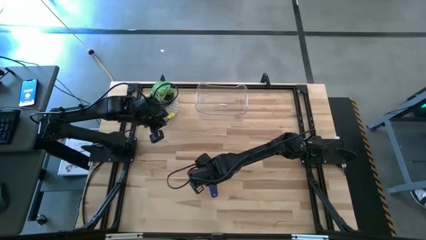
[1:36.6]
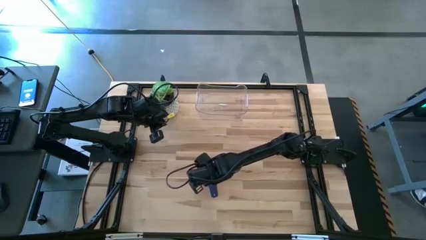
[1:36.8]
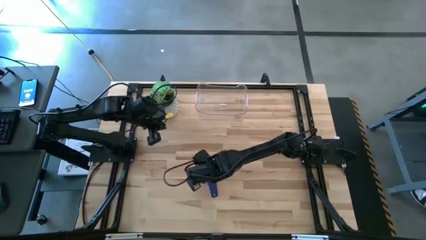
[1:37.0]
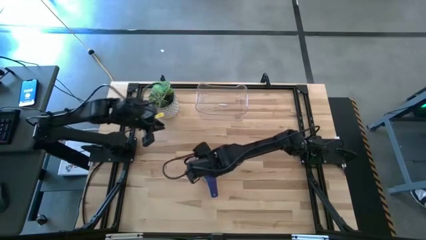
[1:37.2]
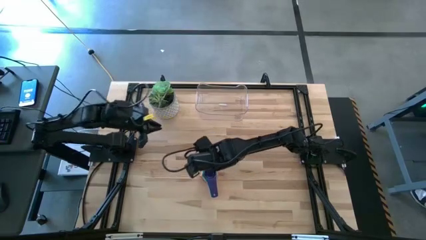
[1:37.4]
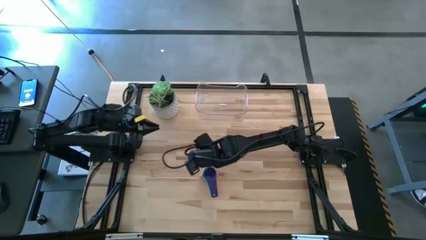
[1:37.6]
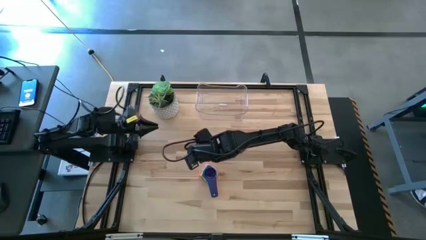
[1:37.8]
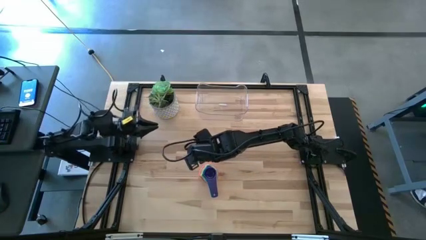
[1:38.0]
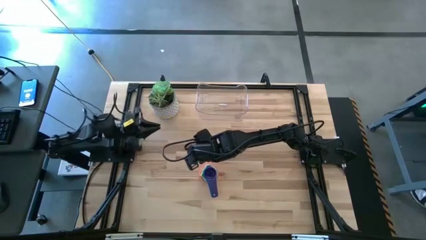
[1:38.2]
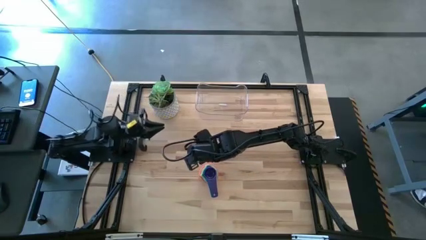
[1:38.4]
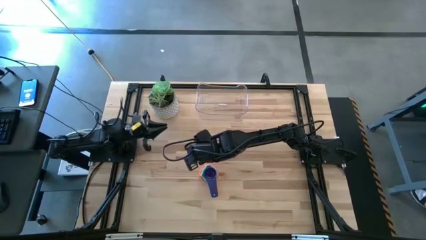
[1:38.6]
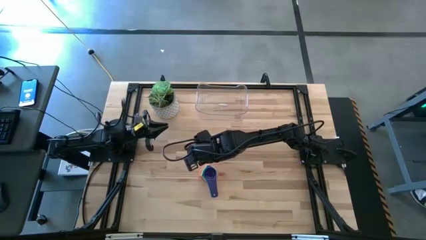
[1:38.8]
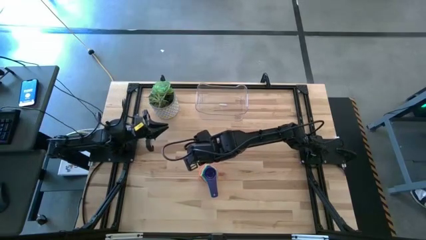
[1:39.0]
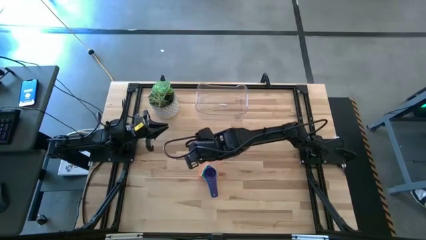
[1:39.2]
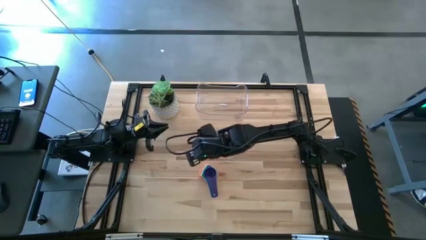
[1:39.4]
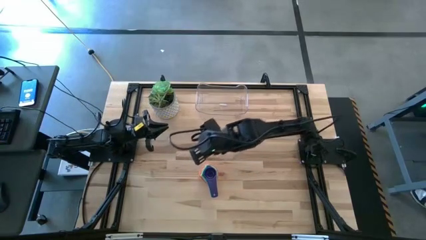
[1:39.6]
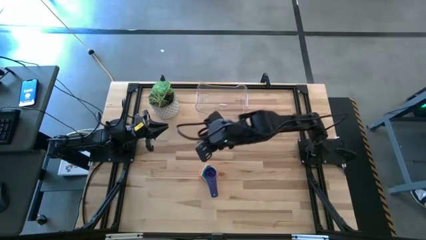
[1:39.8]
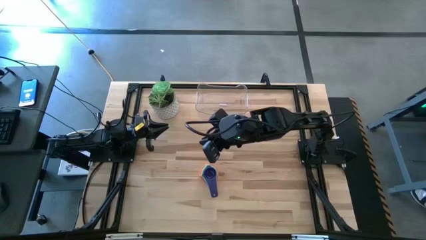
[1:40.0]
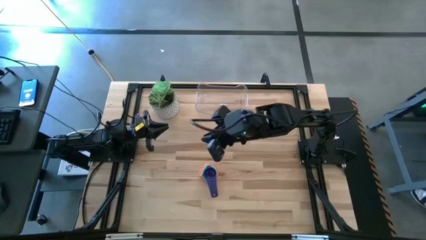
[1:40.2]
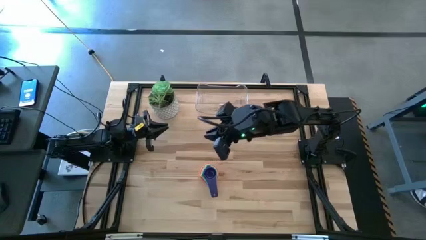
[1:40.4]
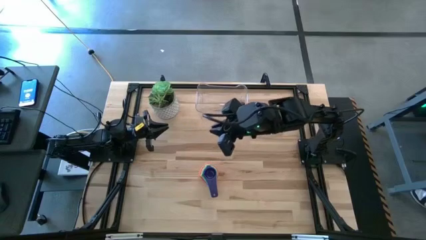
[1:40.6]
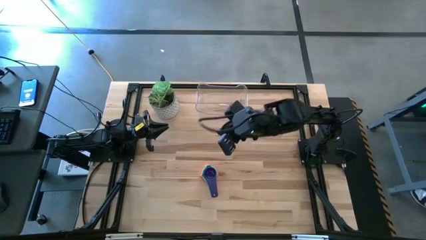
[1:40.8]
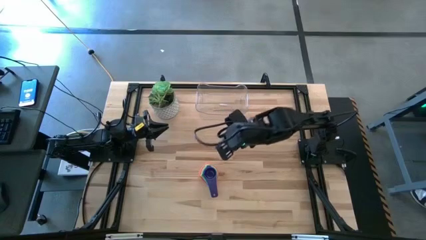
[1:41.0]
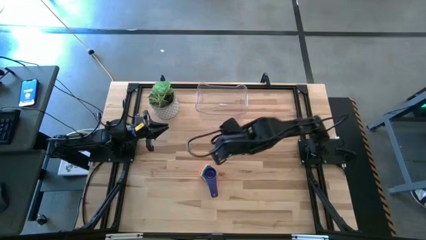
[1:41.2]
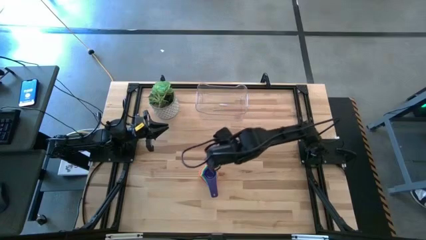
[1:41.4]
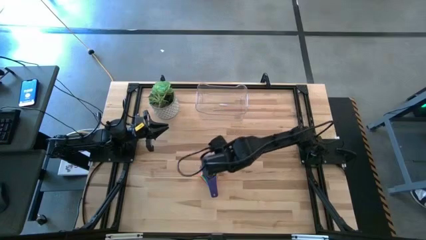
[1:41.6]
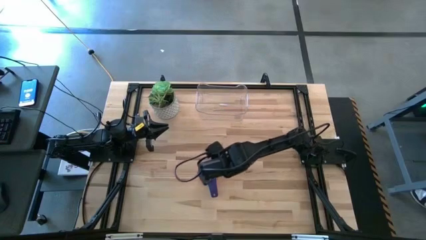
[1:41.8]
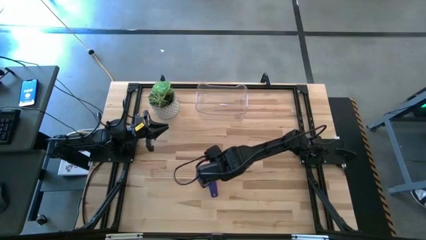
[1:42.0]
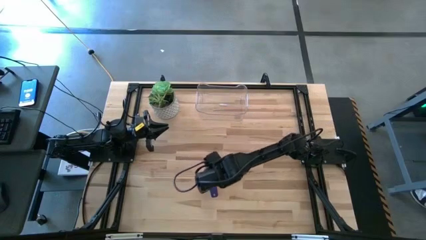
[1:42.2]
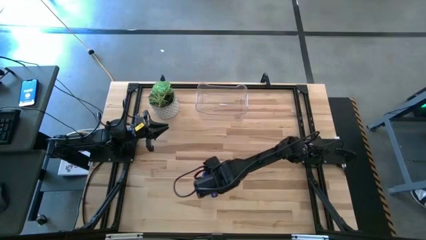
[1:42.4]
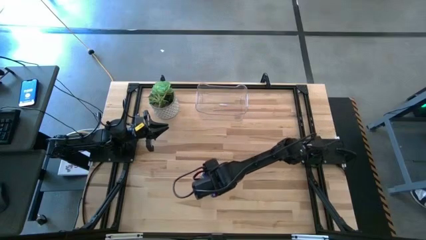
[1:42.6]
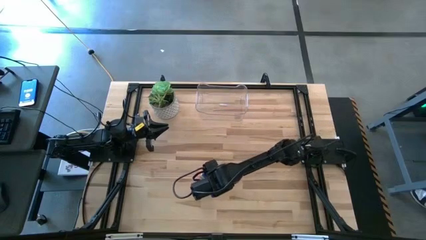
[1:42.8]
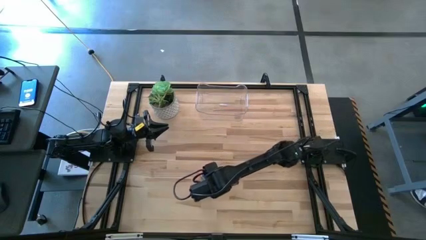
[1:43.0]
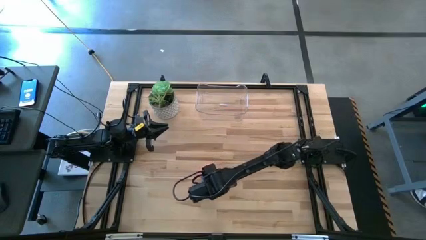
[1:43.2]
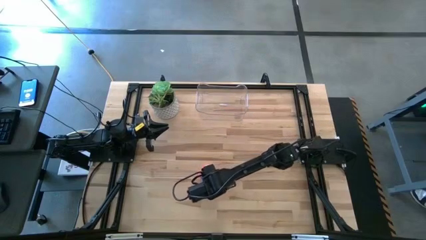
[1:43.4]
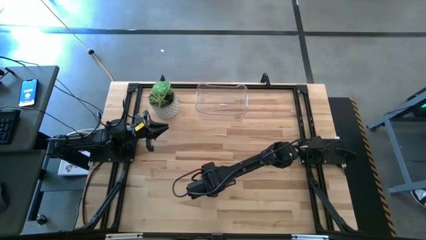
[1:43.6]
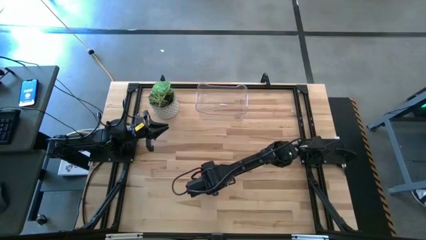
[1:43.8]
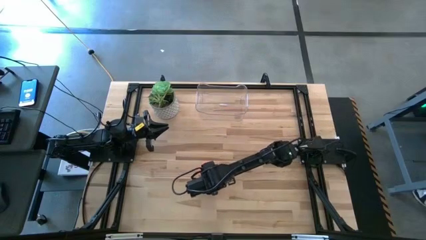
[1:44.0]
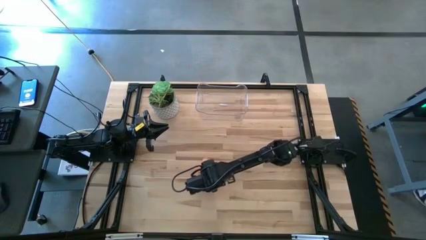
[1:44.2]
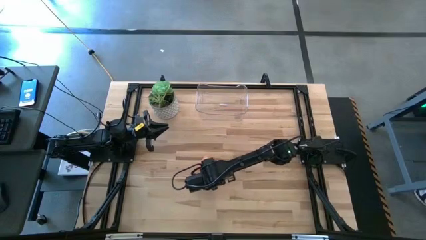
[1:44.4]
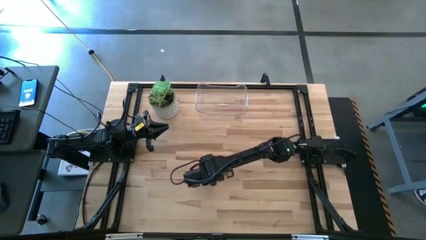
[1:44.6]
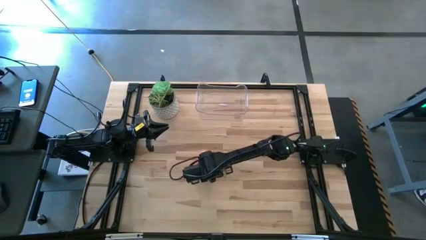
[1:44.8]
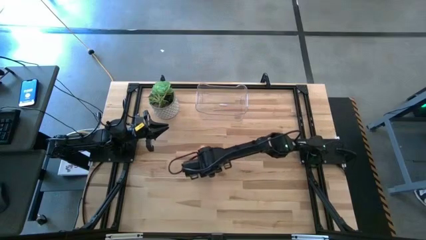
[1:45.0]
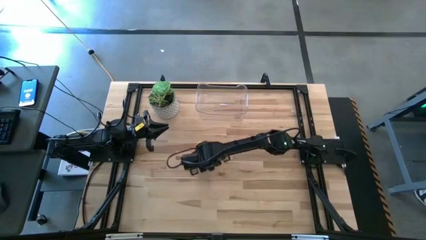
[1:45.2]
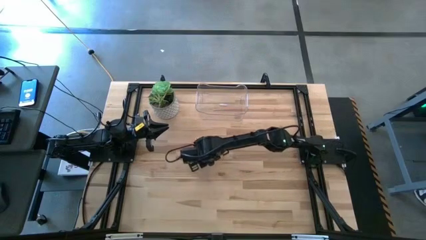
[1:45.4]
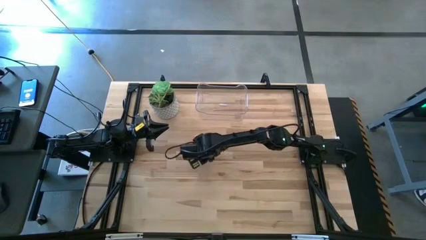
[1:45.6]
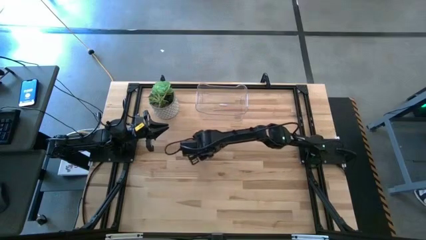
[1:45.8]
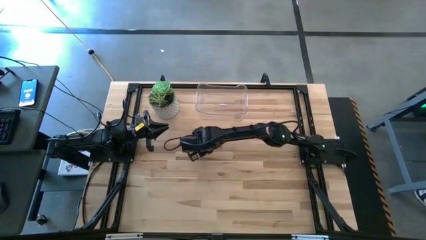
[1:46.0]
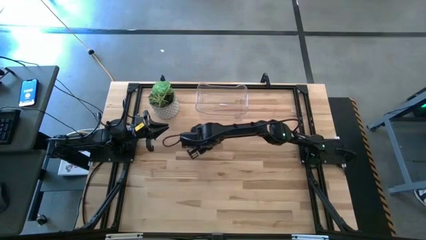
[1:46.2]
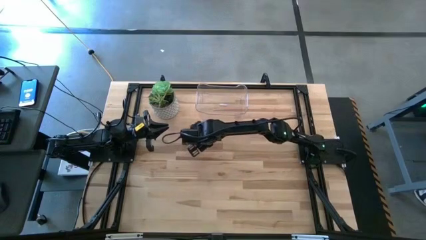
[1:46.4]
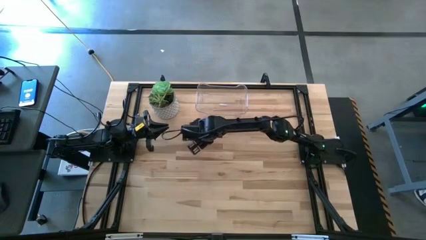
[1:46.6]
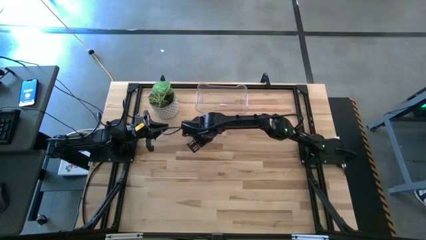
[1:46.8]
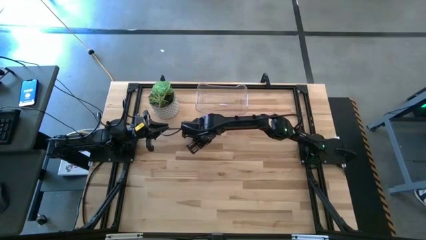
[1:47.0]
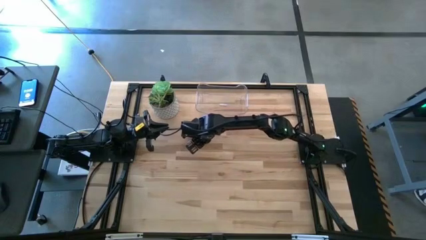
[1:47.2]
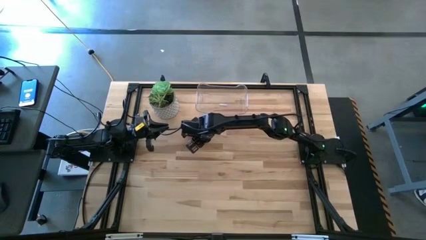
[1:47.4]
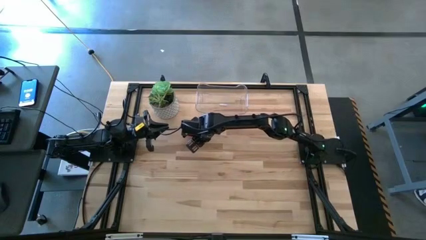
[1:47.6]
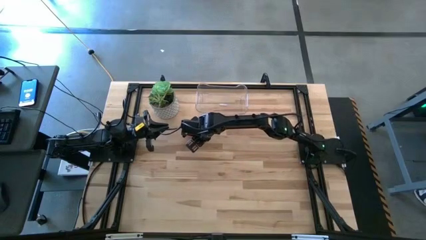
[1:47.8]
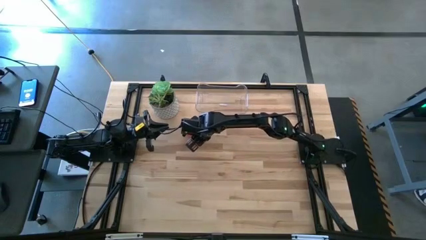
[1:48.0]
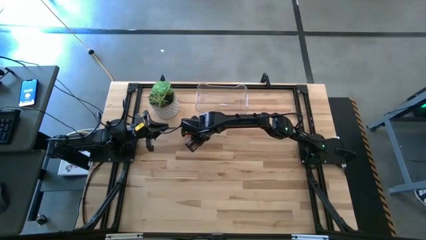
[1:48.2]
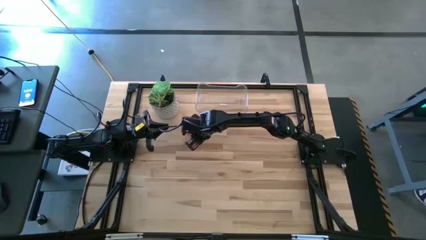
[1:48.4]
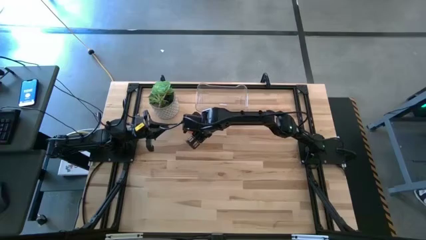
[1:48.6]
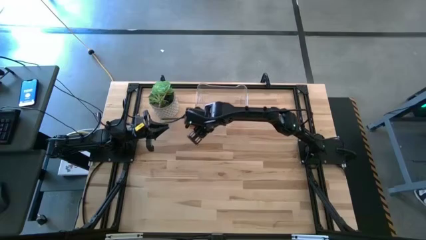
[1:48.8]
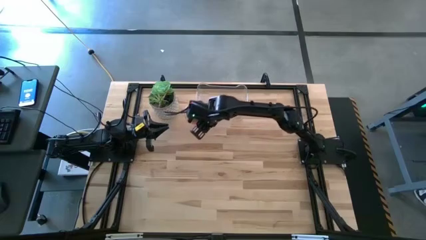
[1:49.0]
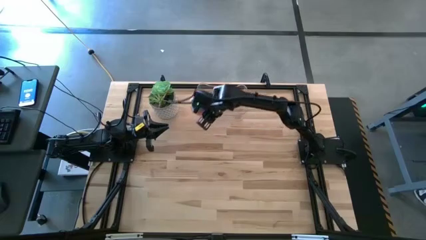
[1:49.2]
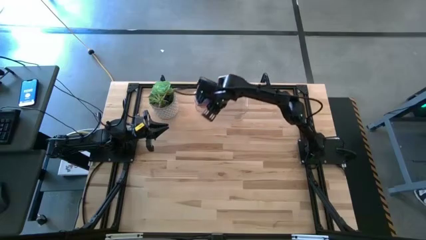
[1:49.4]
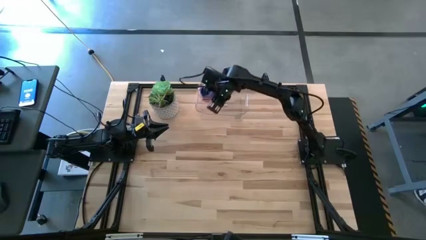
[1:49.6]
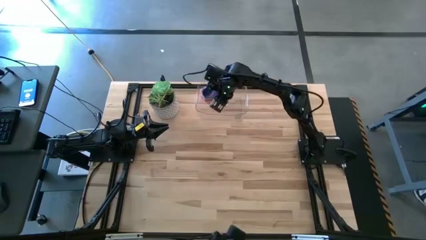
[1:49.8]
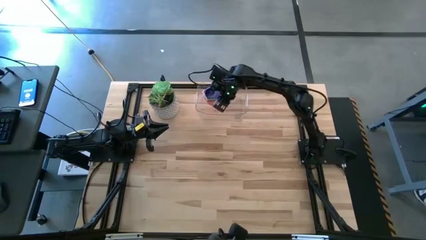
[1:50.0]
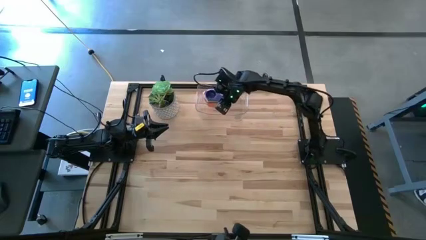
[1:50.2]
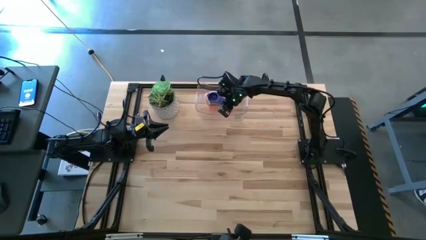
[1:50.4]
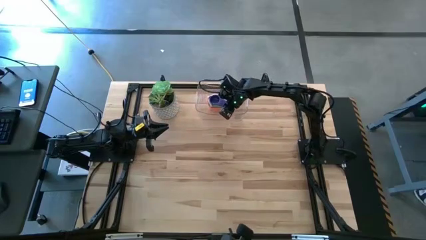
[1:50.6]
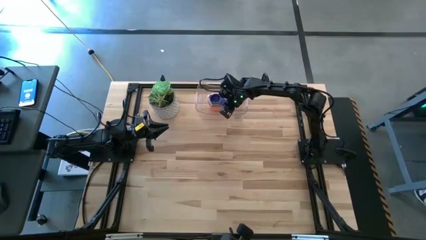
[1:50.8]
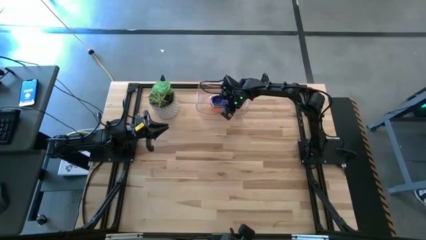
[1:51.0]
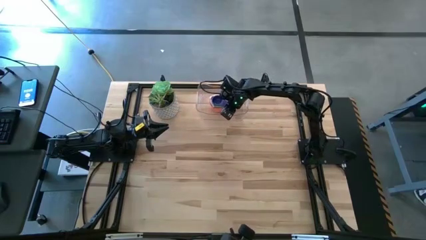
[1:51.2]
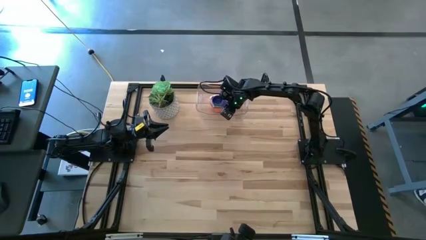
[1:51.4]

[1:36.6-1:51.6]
Task: Nest measuring cups in basket
Put the Stack measuring cups into the transparent bin

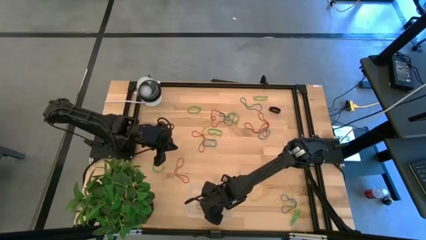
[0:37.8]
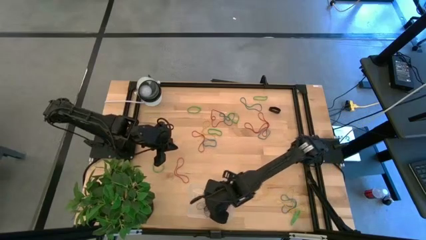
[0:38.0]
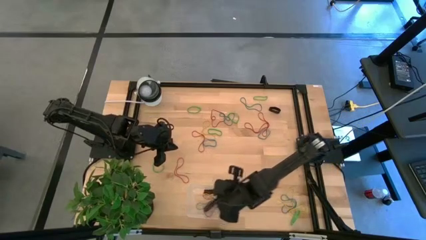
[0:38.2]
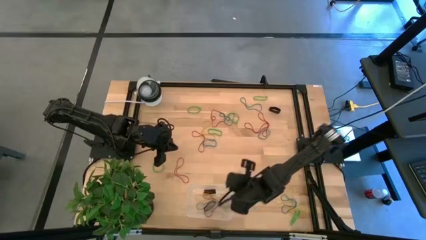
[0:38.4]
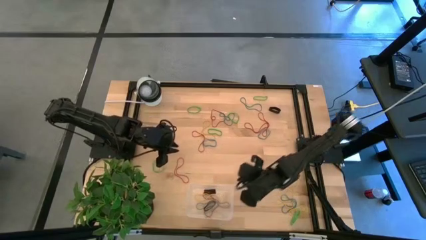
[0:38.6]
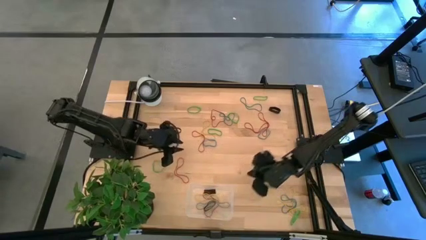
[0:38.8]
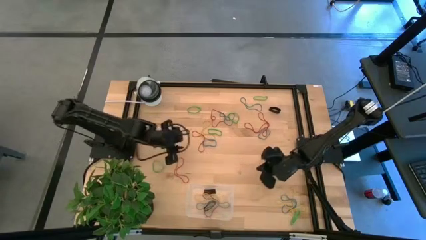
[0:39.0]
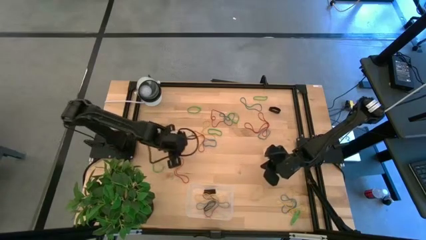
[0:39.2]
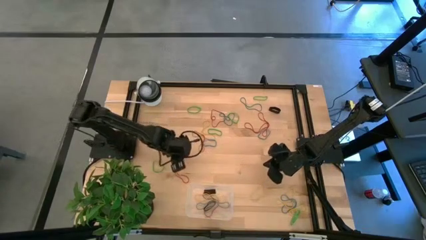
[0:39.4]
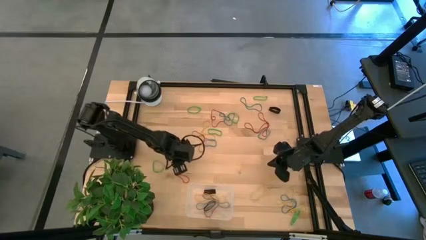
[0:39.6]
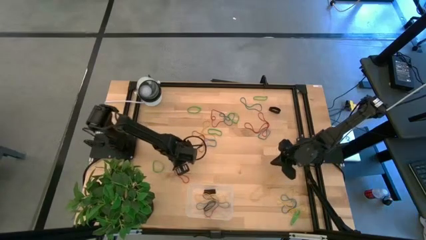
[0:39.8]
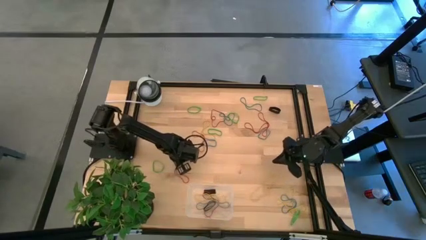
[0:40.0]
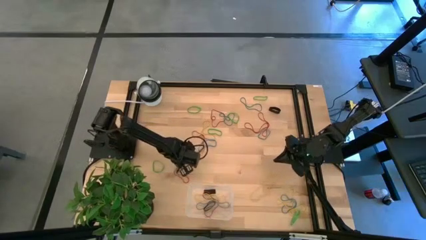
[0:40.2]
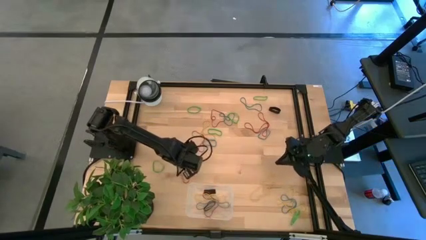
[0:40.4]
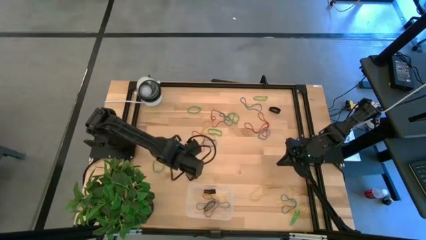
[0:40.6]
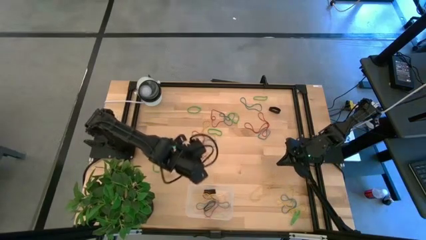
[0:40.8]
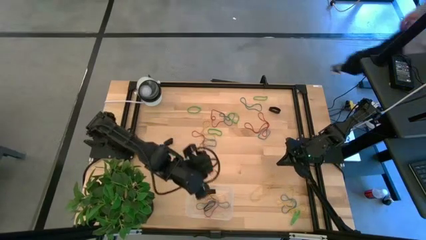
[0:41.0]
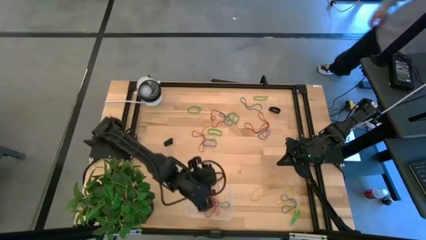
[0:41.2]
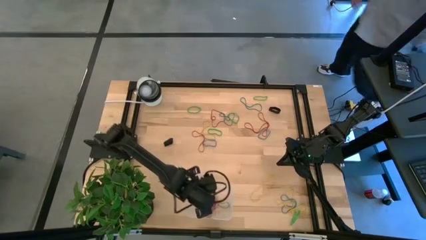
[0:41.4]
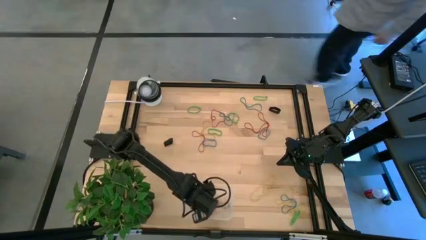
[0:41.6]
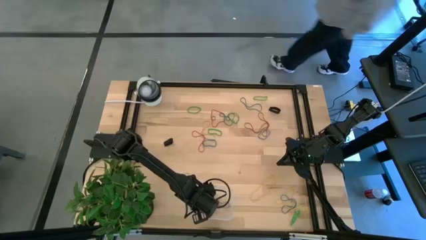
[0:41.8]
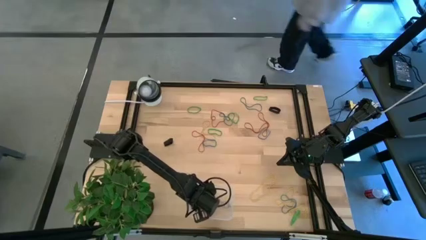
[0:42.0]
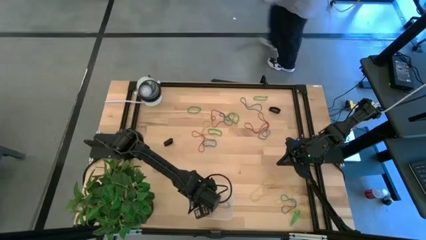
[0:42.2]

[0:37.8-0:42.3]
Task: Pick and place rubber bands into bin
Put the red rubber band into the transparent bin
